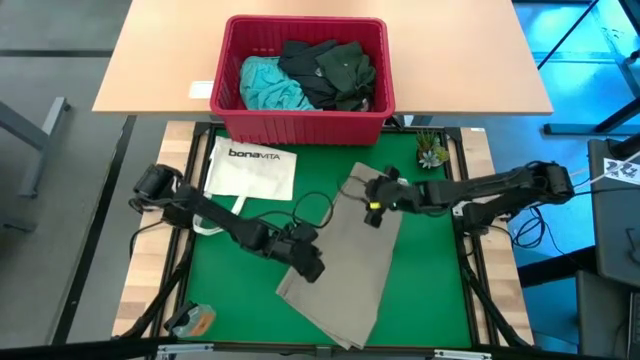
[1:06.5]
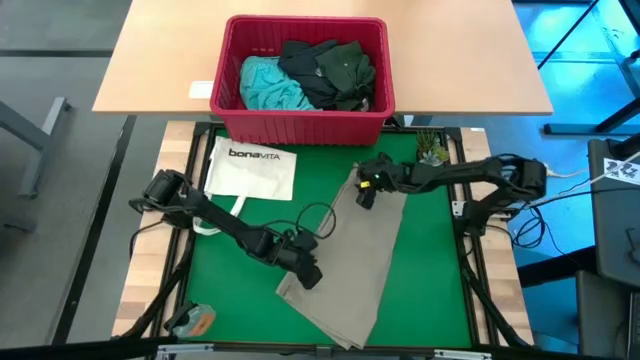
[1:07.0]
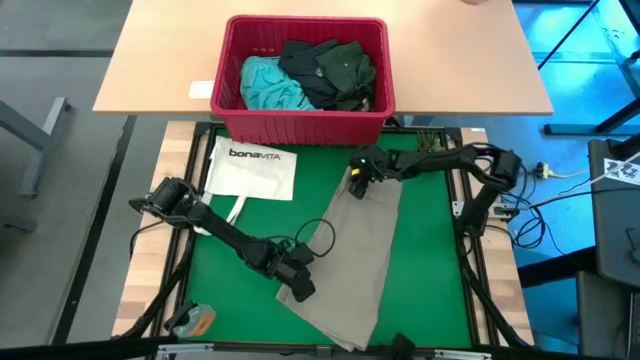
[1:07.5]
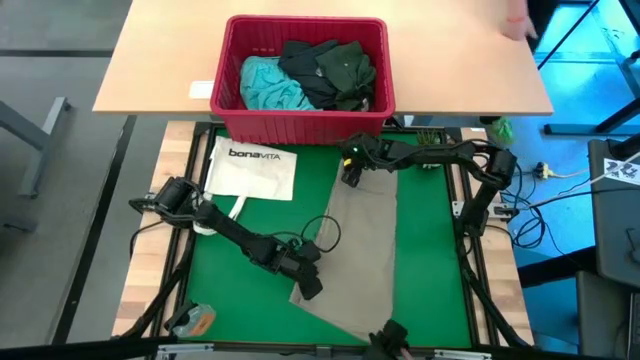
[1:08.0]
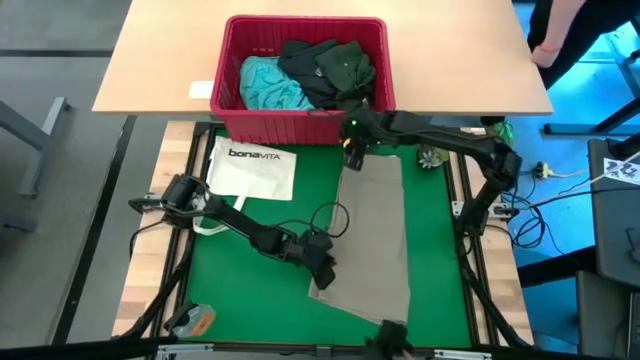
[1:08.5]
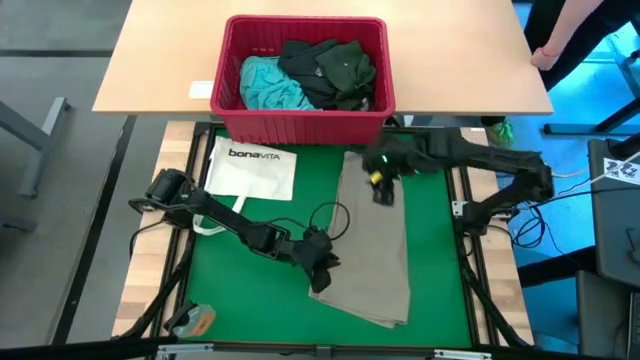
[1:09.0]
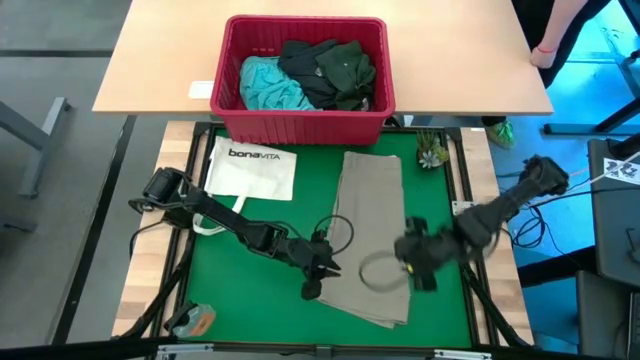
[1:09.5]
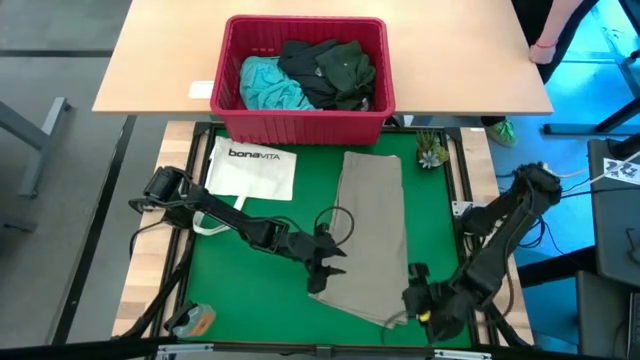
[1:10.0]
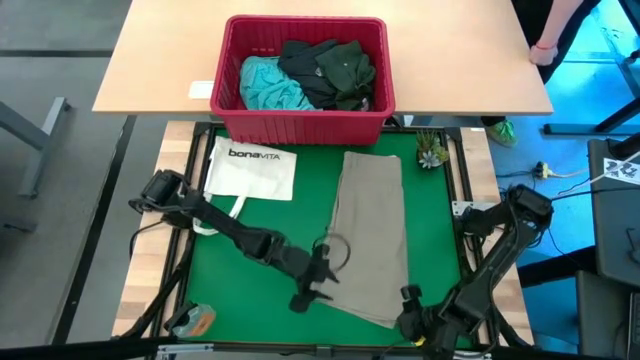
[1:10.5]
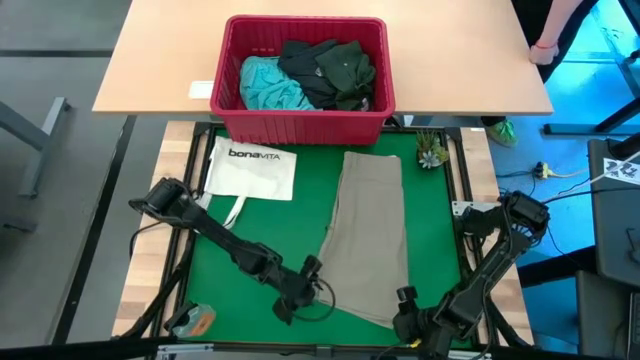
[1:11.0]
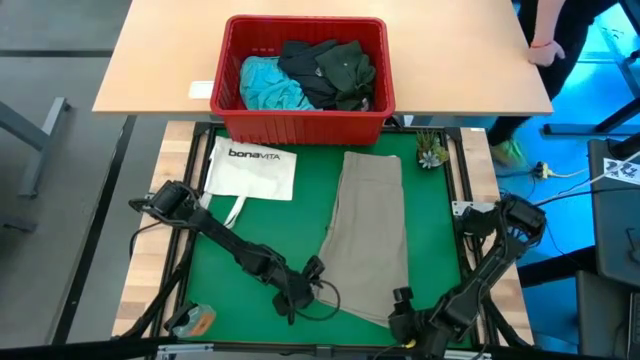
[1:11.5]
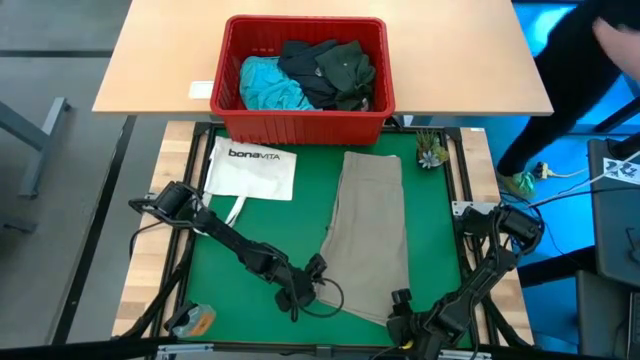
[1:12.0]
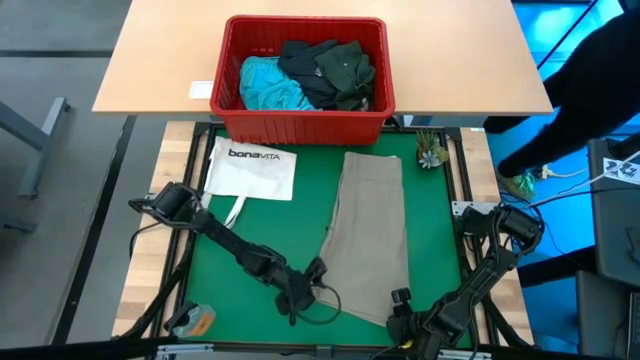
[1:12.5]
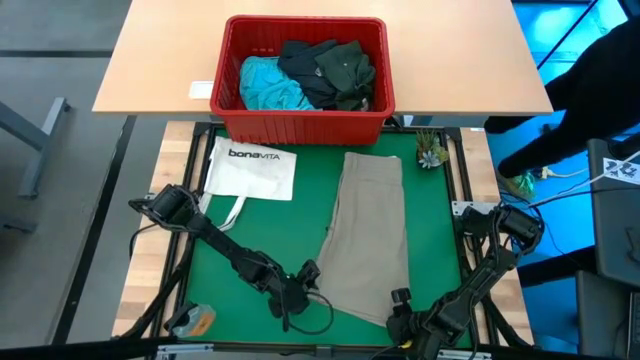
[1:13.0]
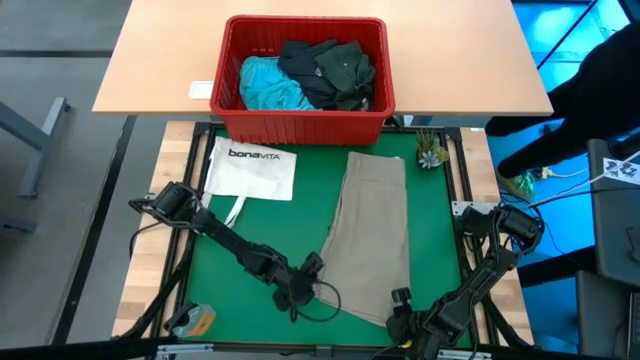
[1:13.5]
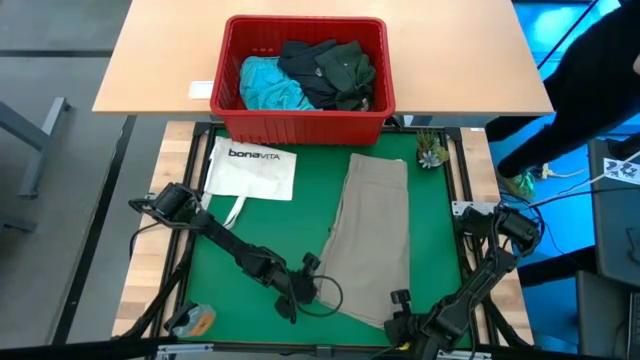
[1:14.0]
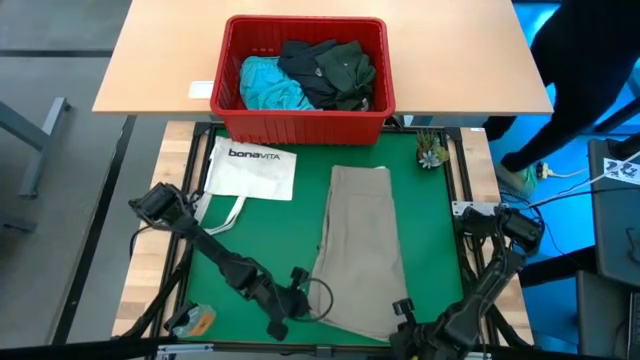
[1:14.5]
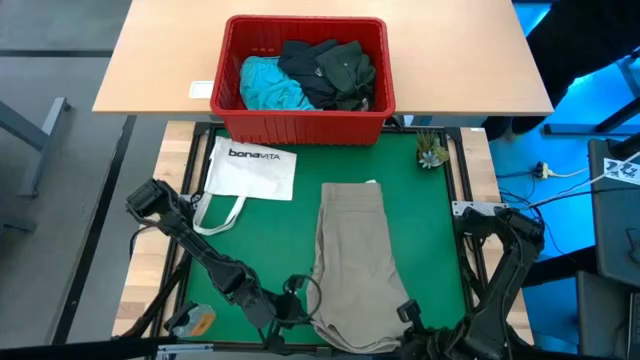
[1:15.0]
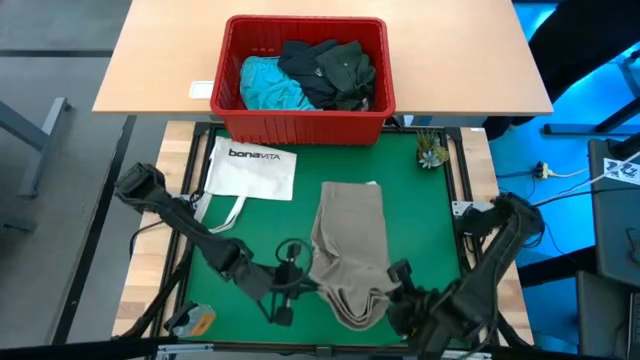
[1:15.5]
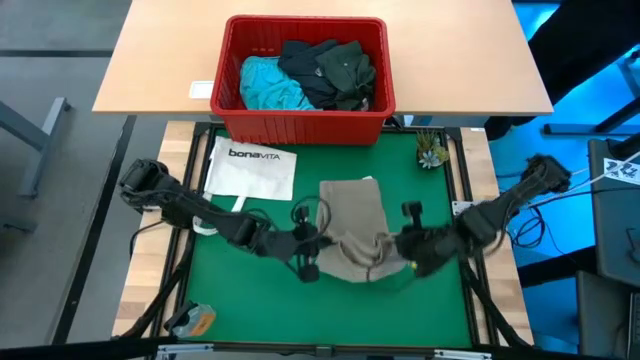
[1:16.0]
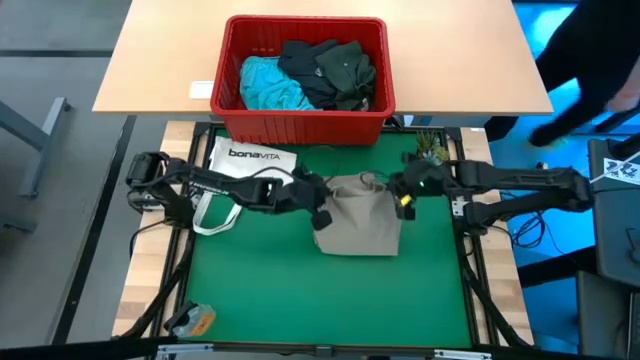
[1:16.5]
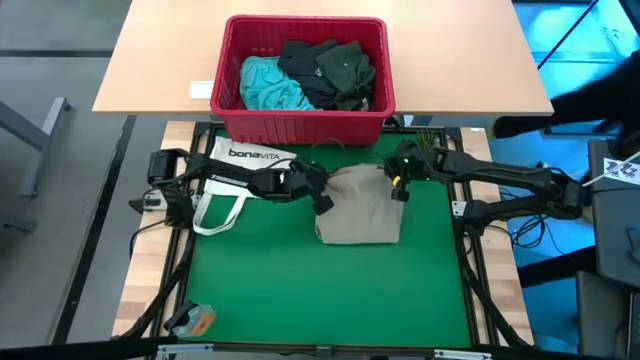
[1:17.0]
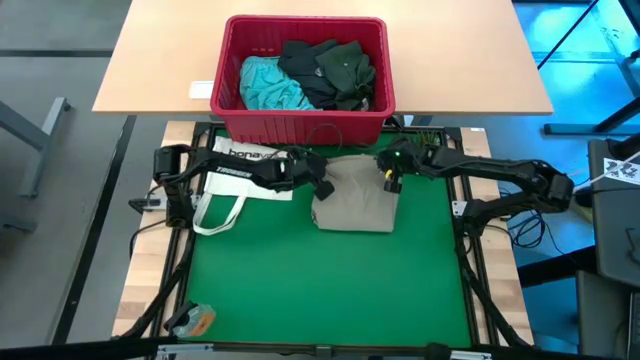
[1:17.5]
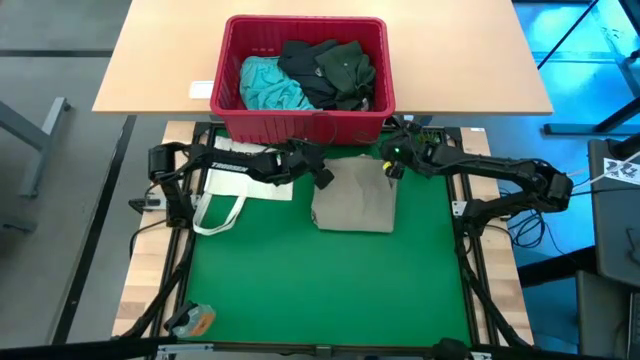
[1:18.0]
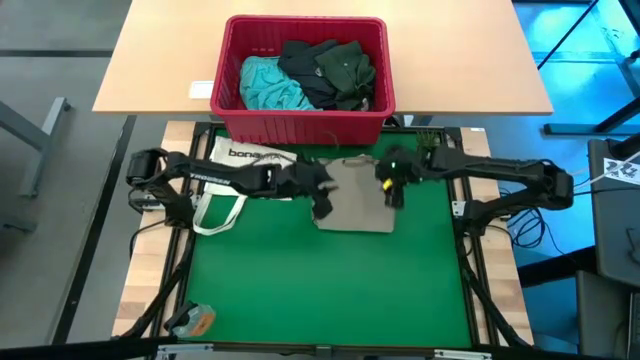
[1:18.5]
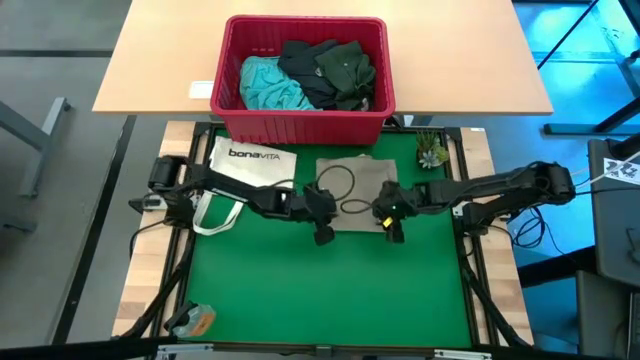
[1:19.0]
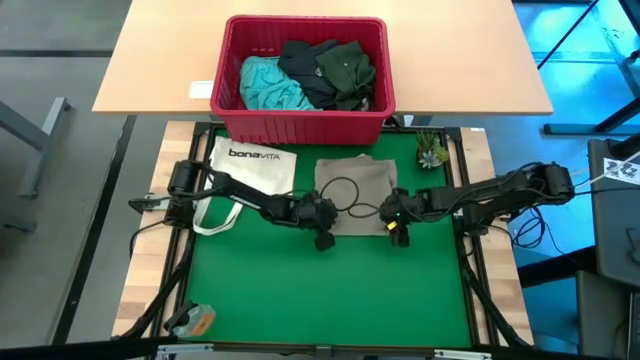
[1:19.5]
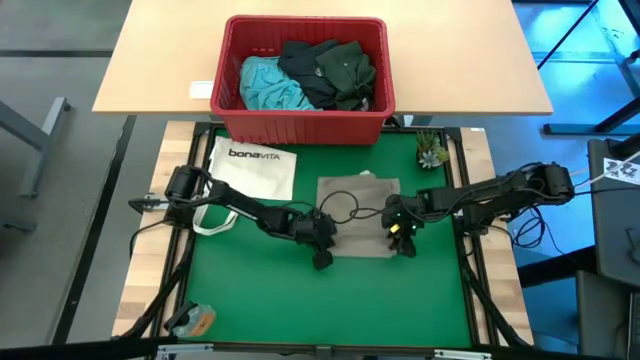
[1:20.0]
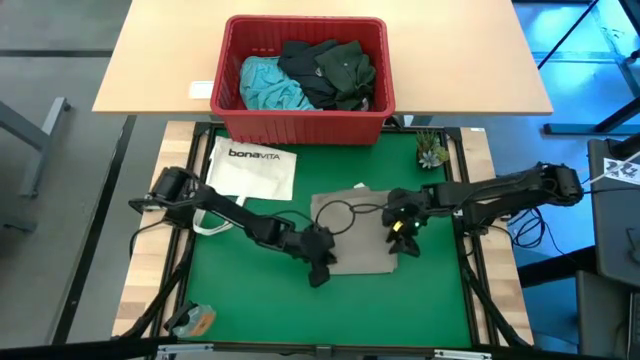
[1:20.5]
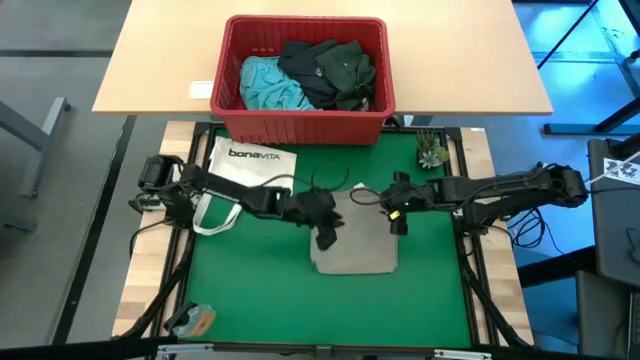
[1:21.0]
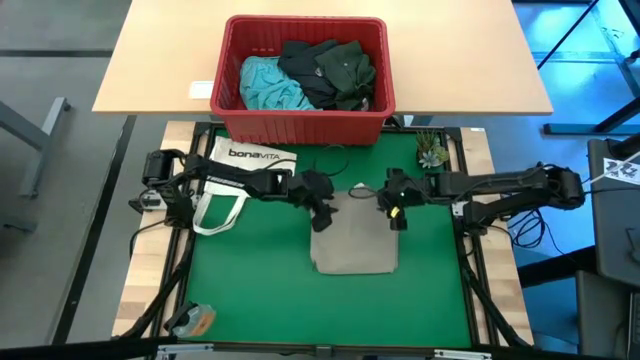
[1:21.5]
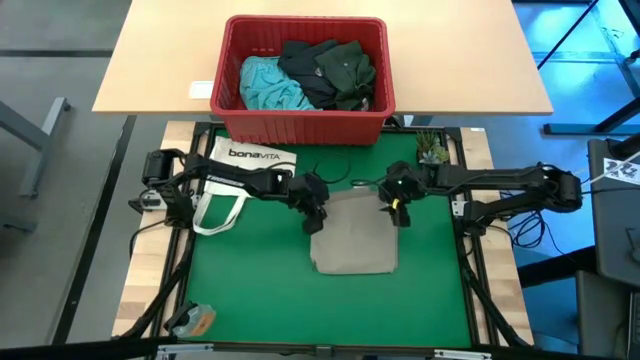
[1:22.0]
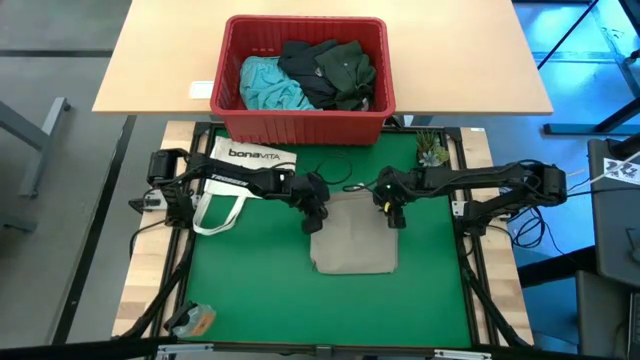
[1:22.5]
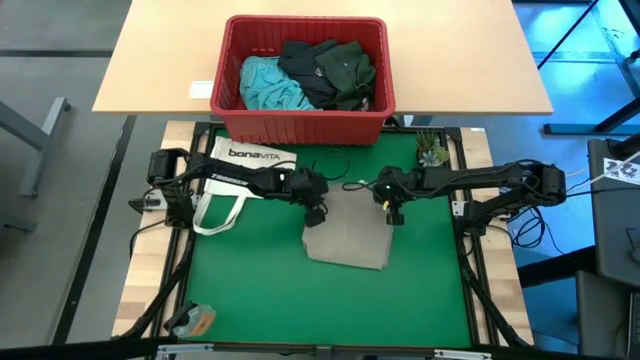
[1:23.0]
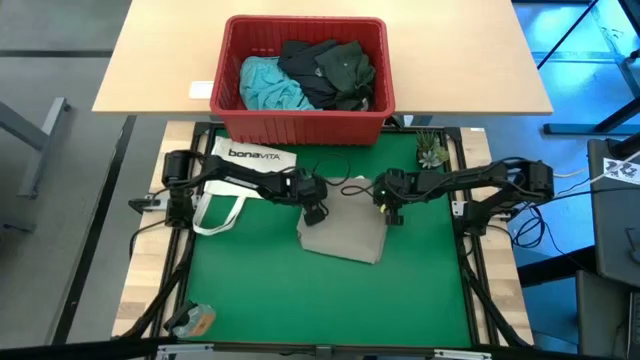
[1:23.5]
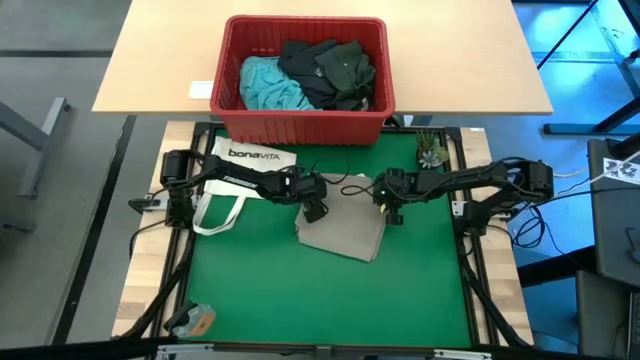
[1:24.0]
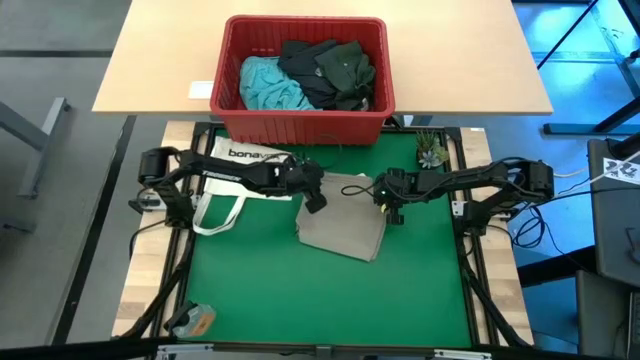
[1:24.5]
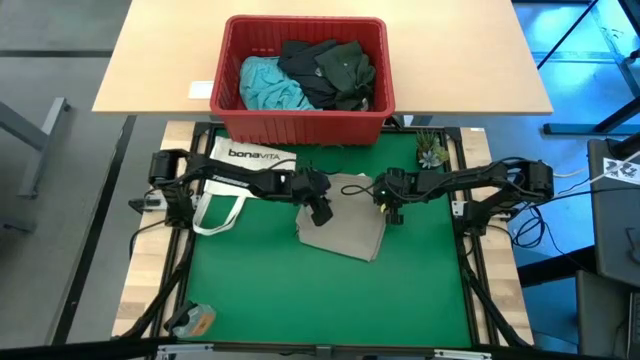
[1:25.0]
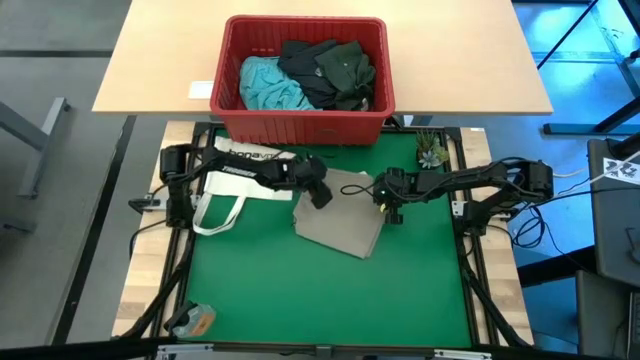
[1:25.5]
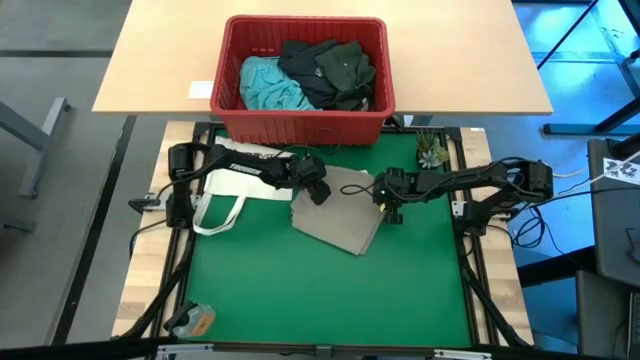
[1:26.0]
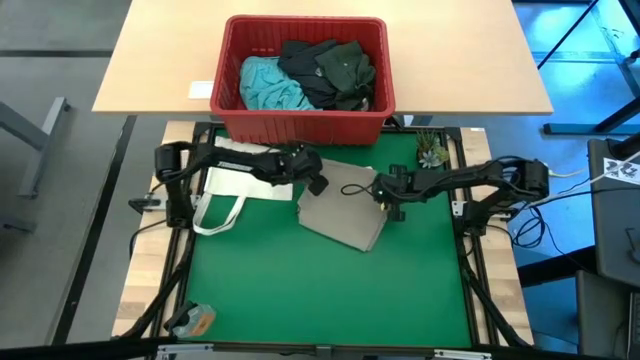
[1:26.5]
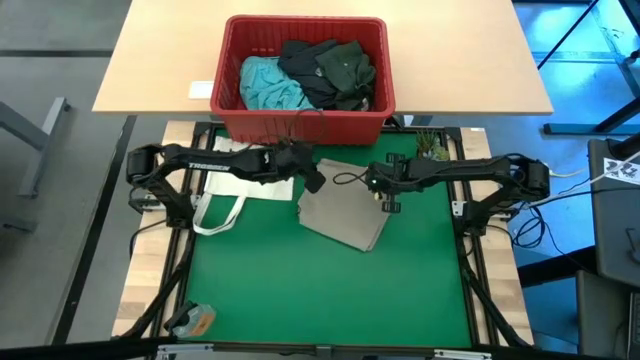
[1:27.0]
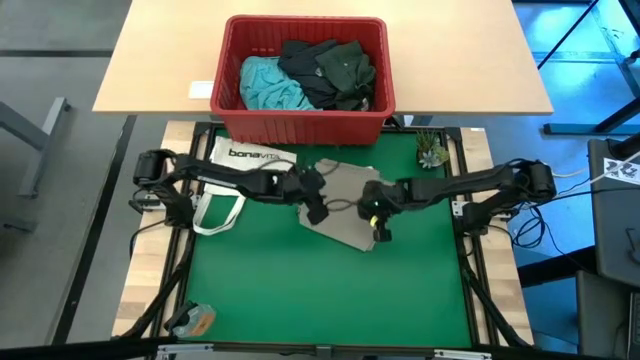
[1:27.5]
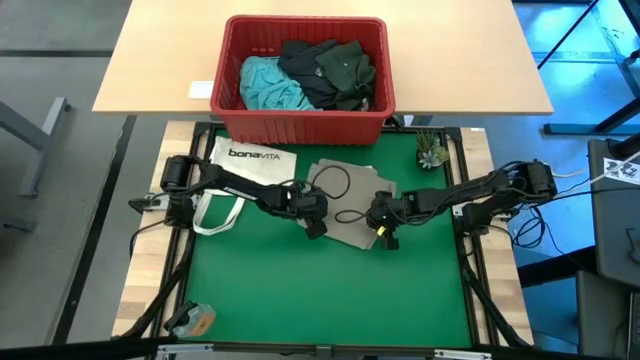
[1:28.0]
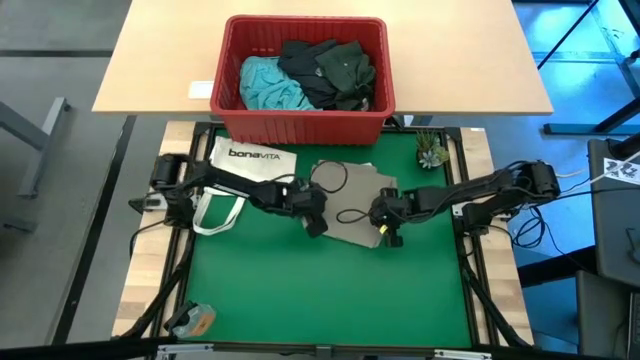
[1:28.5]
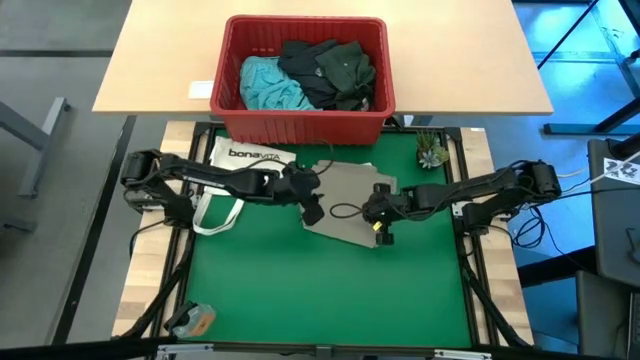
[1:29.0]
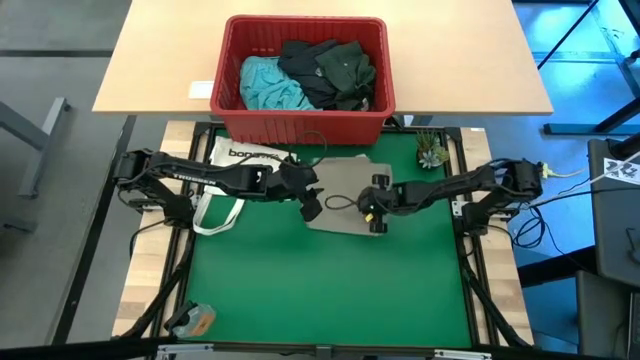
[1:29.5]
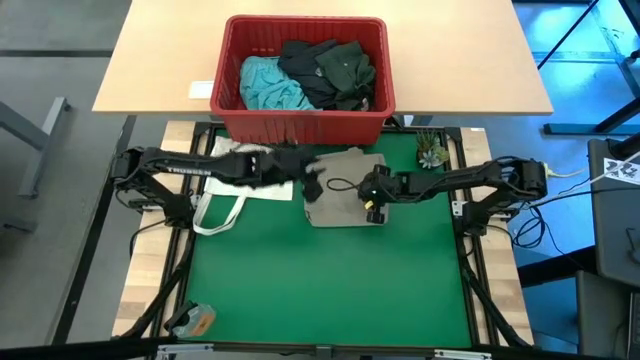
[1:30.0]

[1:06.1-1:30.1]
Task: Fold Laundry from Bin
Fold the light brown shorts
